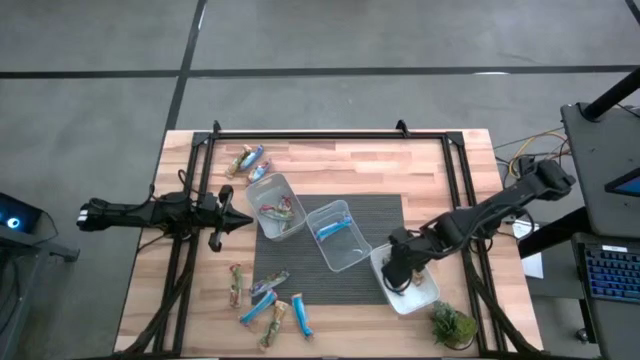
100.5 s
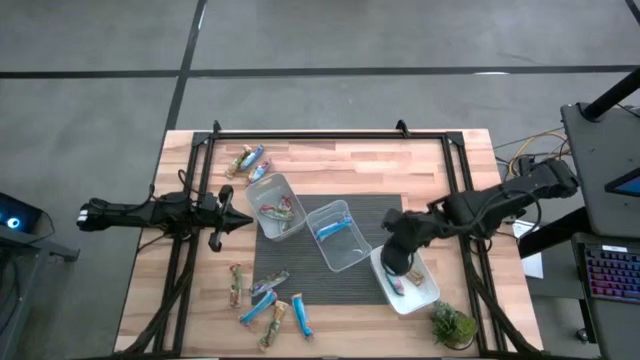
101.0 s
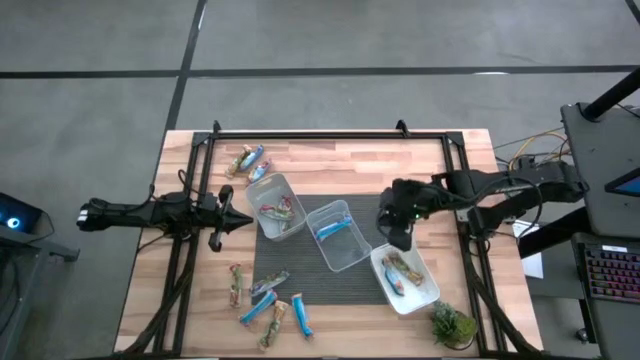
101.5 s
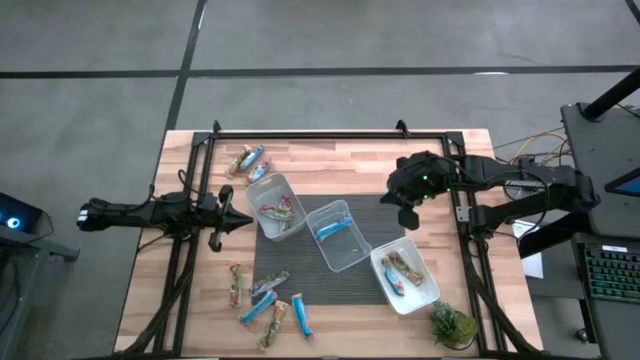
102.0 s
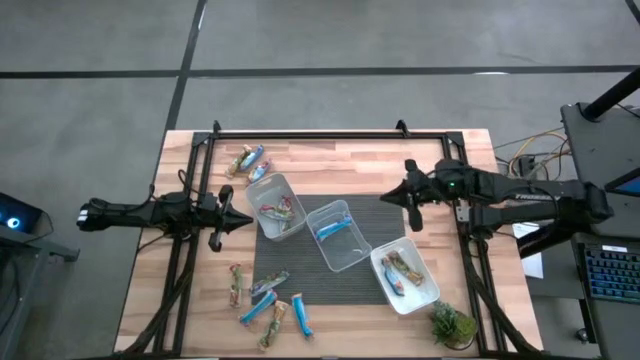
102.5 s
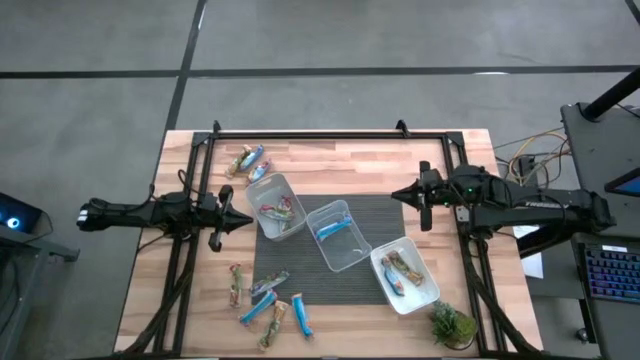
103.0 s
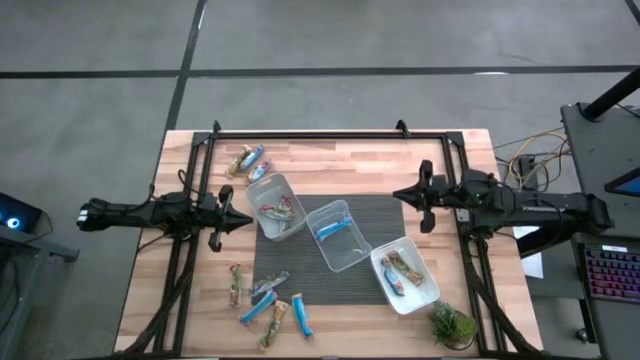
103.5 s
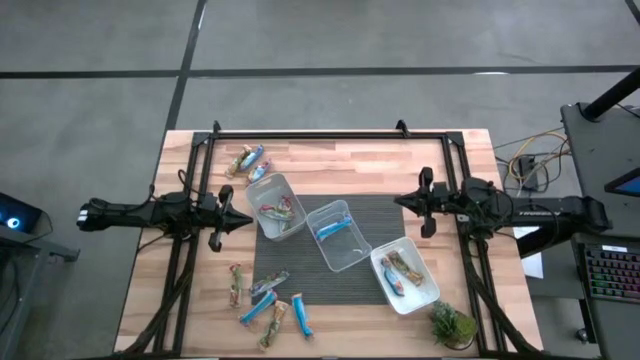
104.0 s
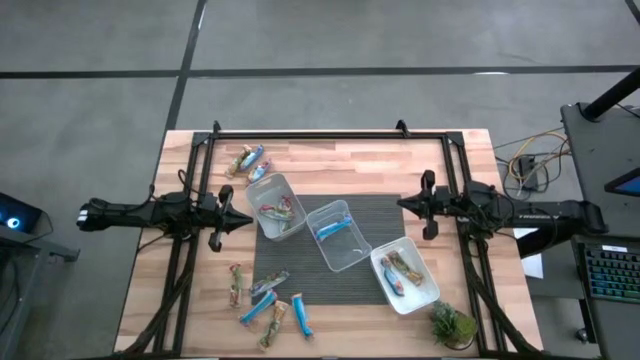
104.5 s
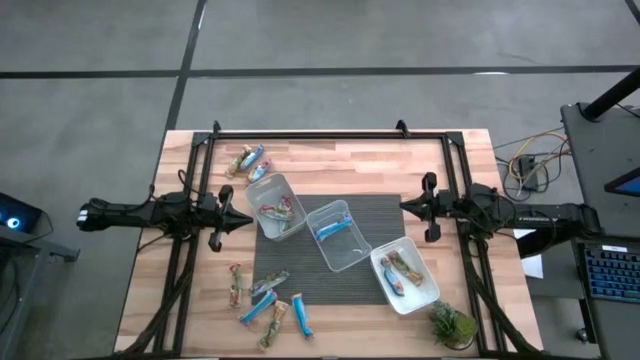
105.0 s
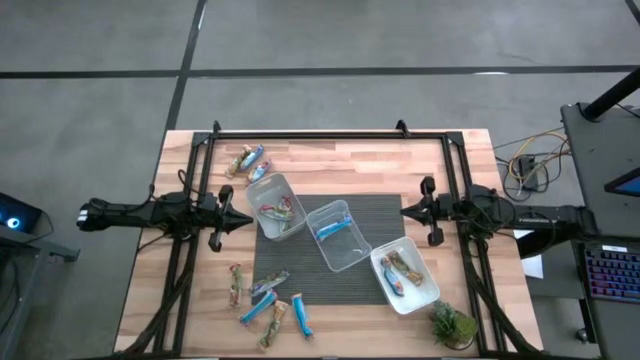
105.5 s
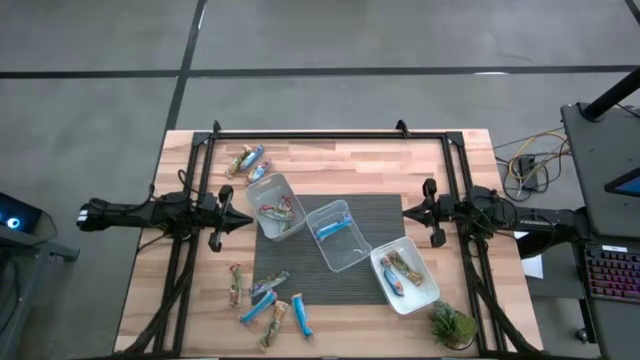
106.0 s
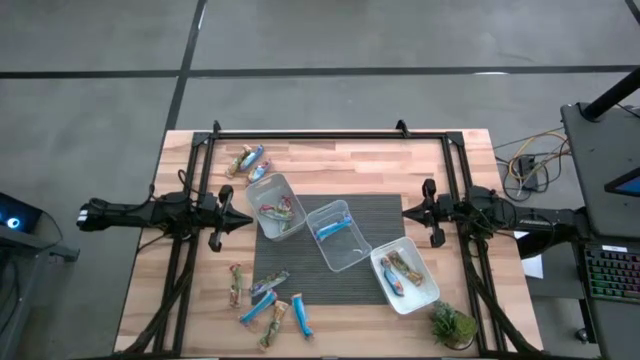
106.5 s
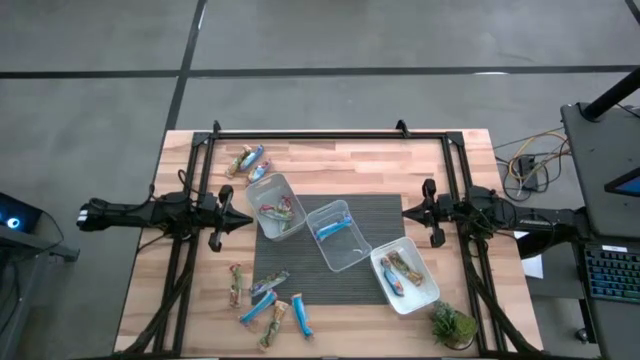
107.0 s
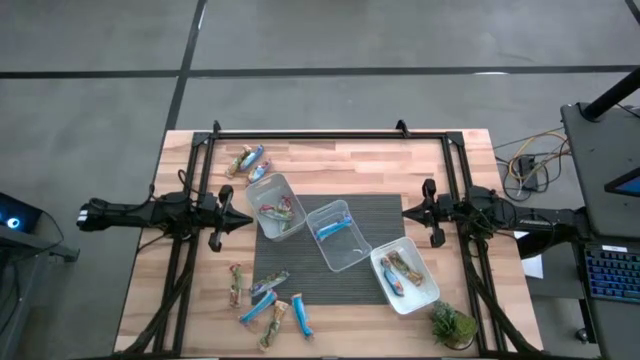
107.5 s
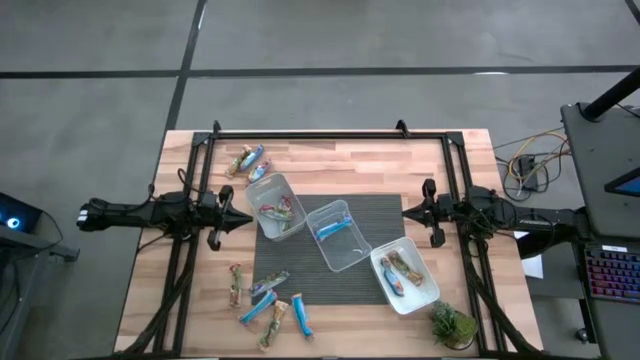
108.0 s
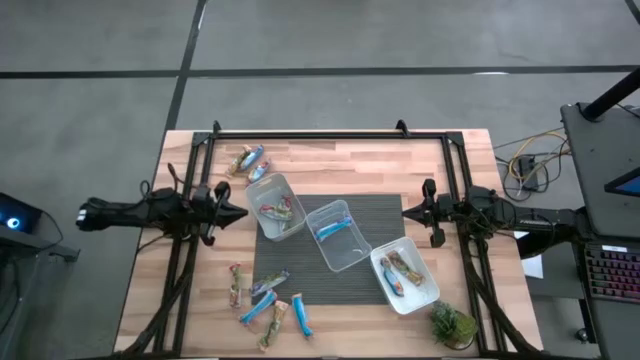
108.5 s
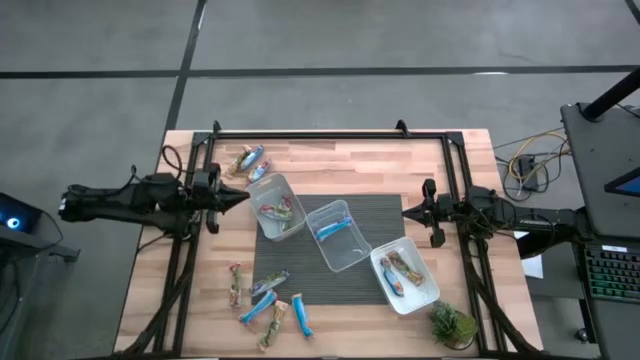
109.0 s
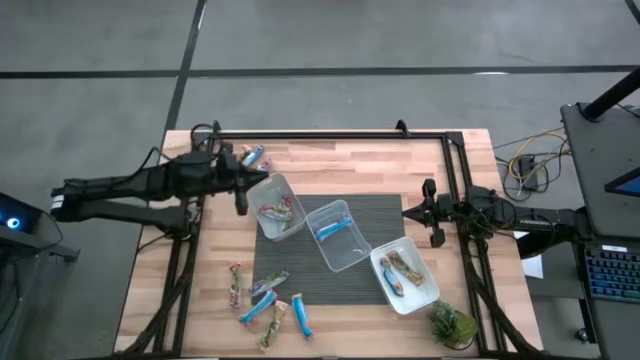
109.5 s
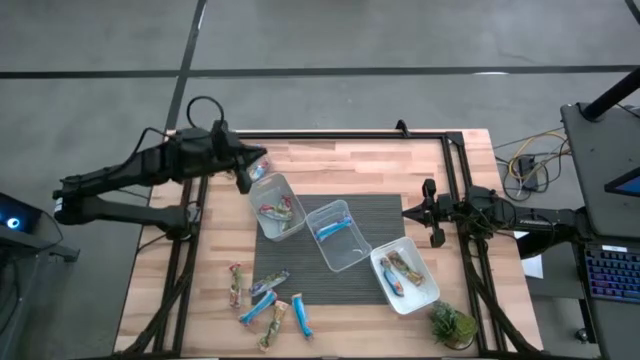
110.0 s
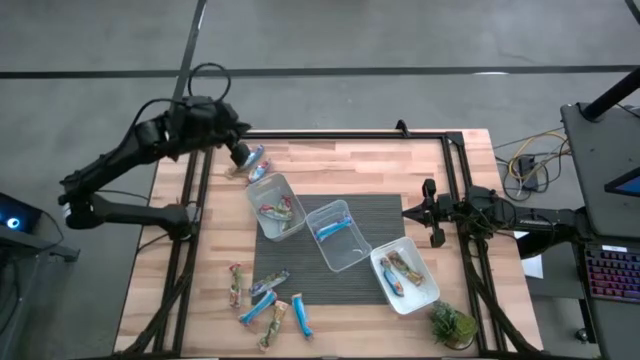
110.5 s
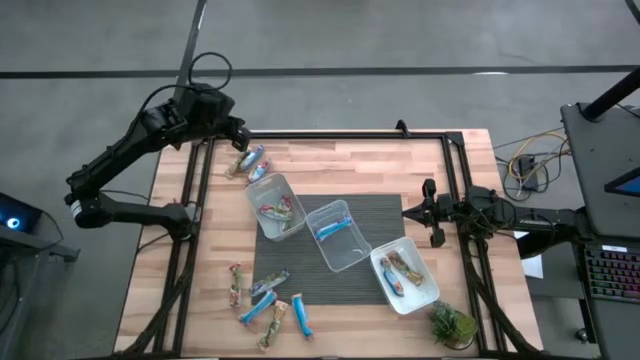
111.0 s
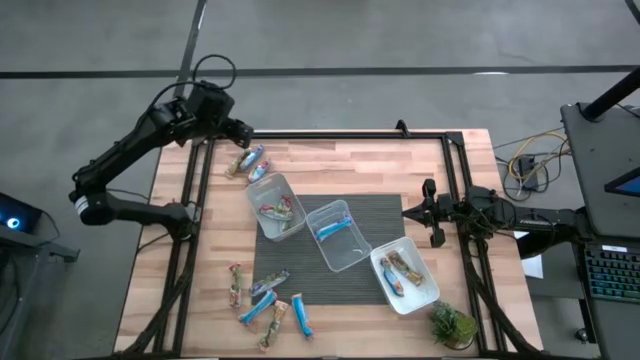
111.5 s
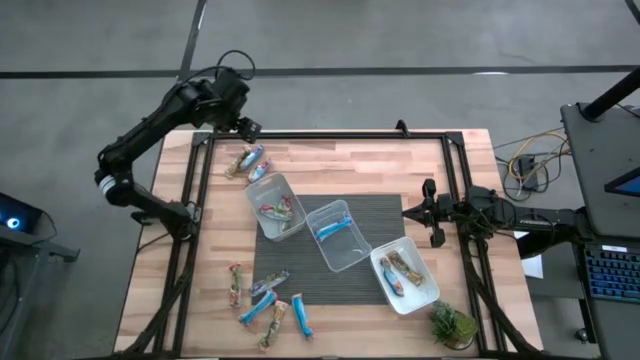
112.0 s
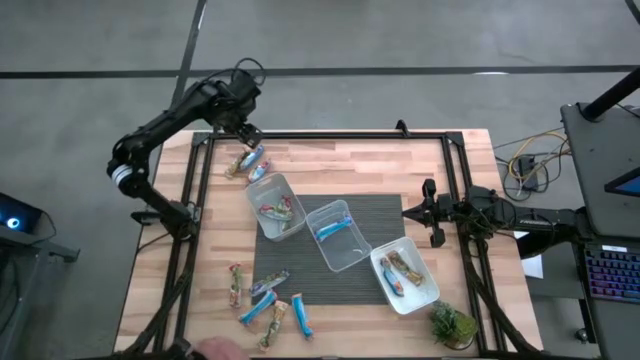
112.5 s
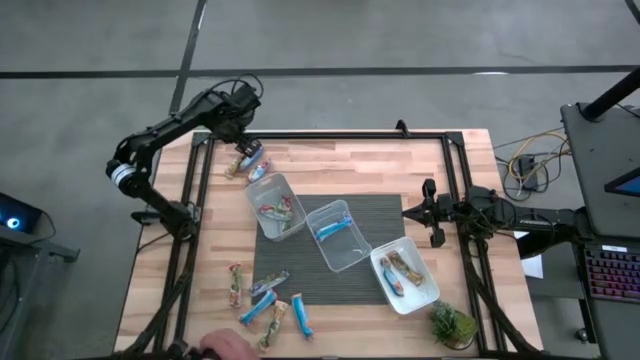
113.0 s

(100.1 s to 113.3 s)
Task: Pick and place Granola Bars by type
Put the yellow granola bar into the white bin

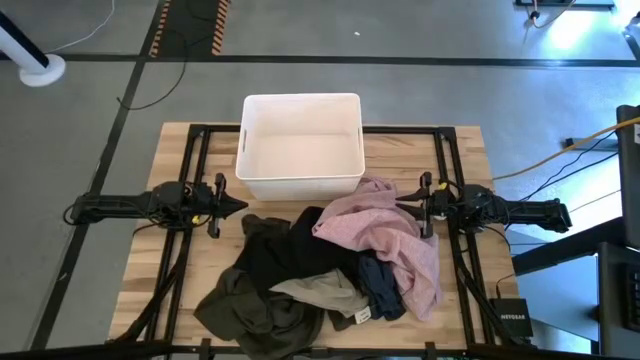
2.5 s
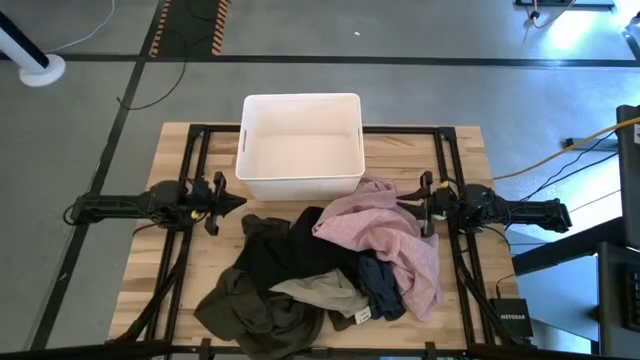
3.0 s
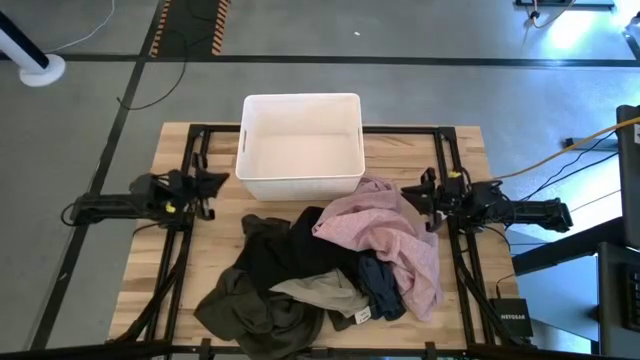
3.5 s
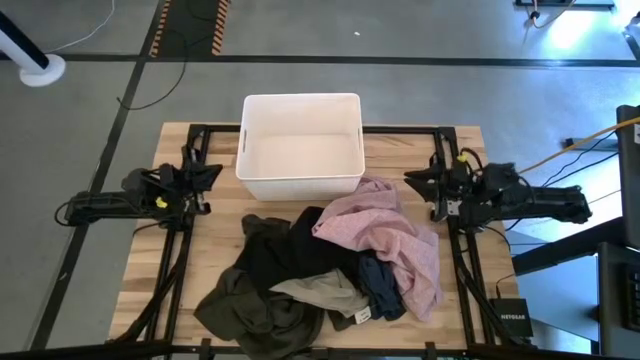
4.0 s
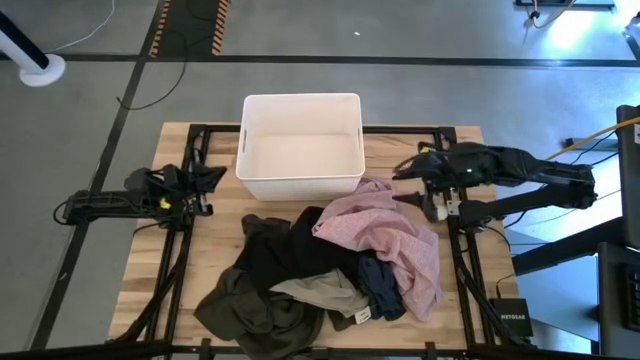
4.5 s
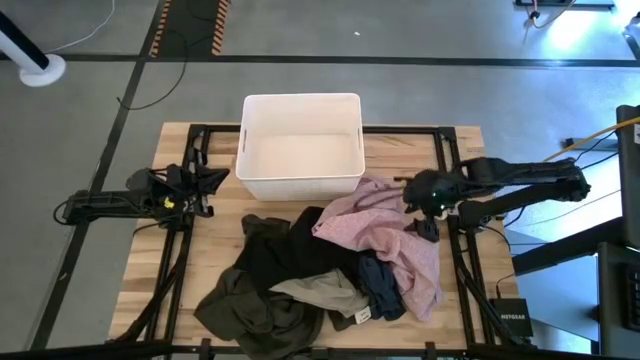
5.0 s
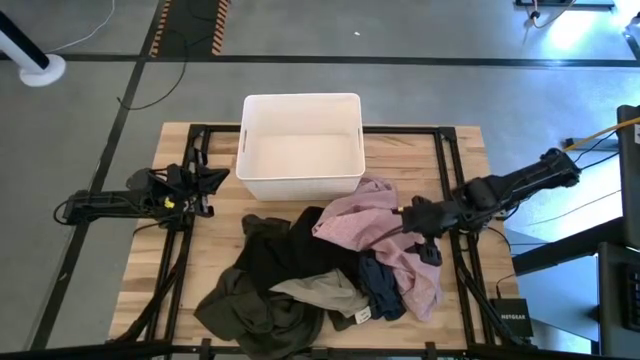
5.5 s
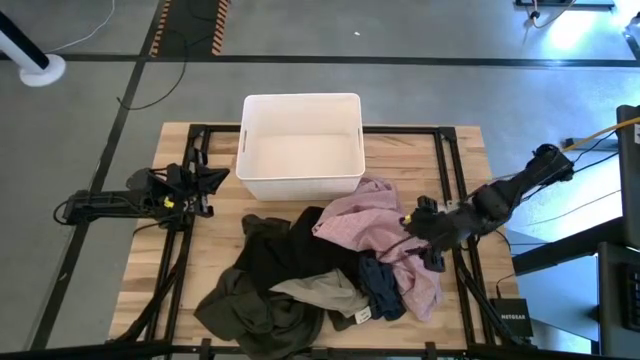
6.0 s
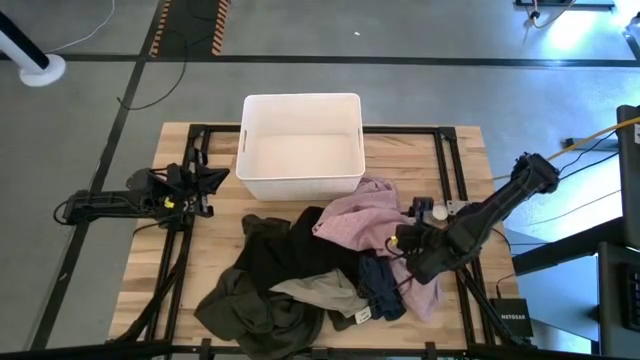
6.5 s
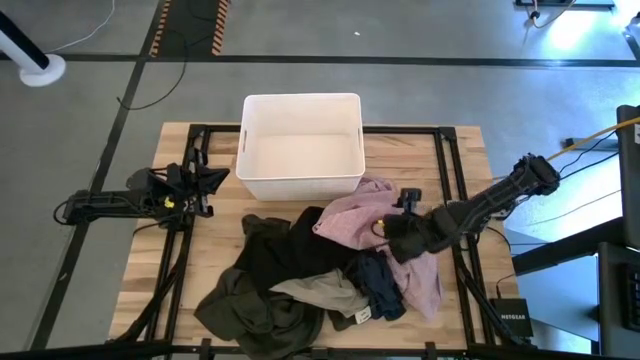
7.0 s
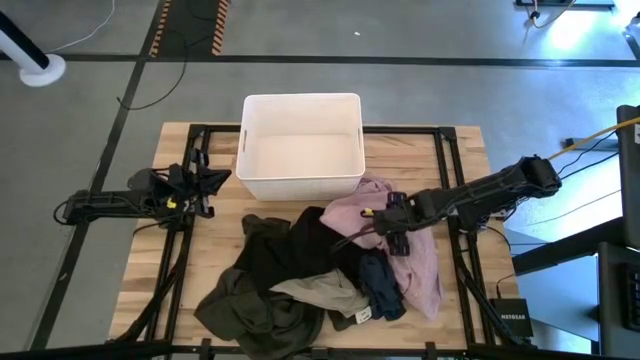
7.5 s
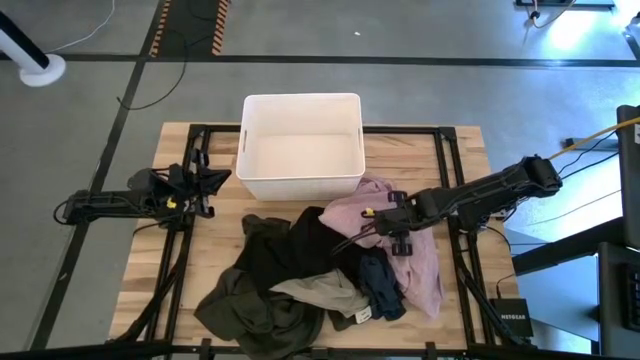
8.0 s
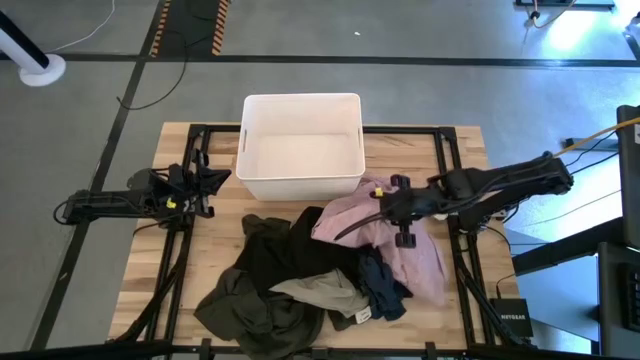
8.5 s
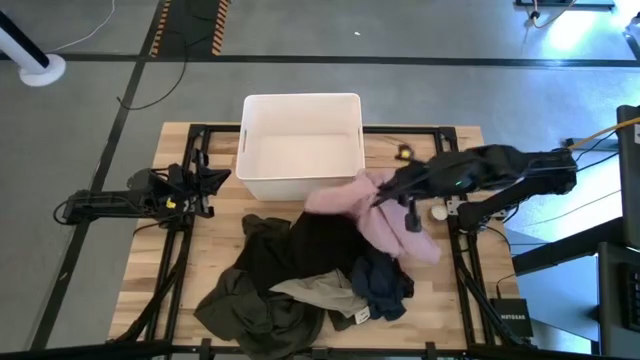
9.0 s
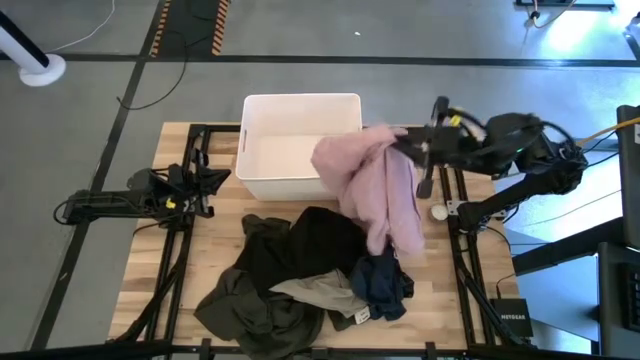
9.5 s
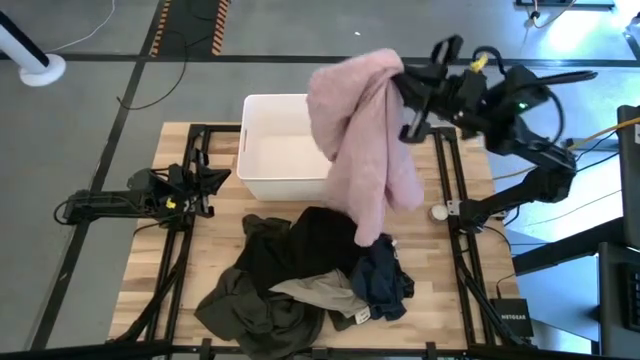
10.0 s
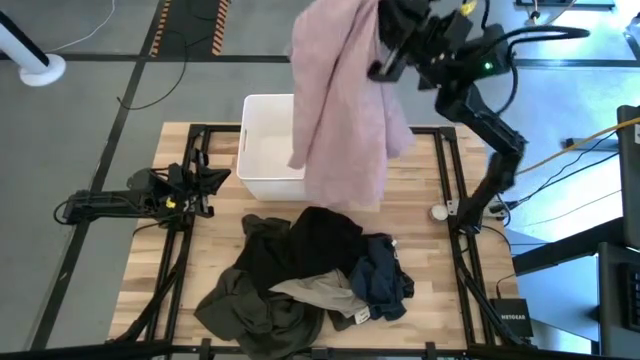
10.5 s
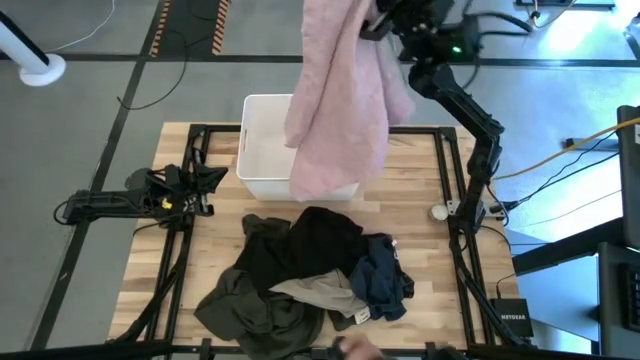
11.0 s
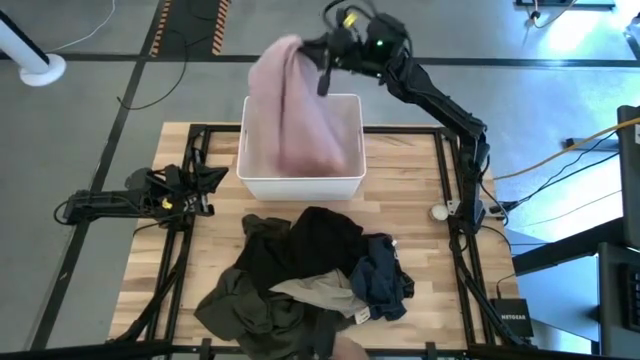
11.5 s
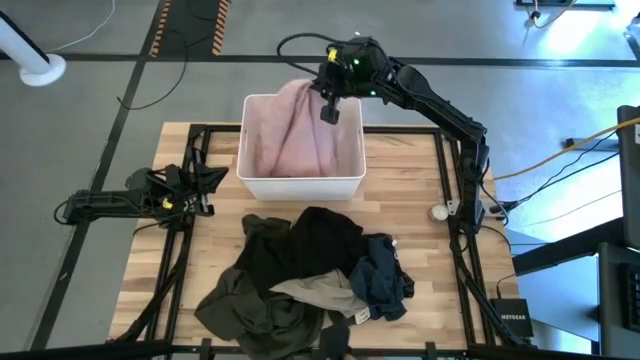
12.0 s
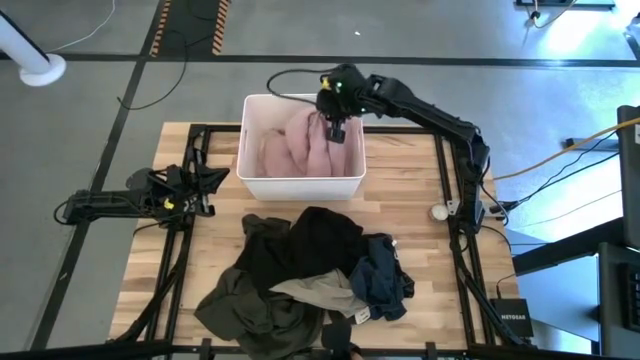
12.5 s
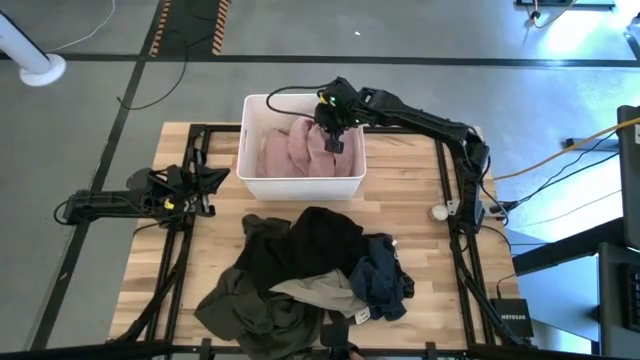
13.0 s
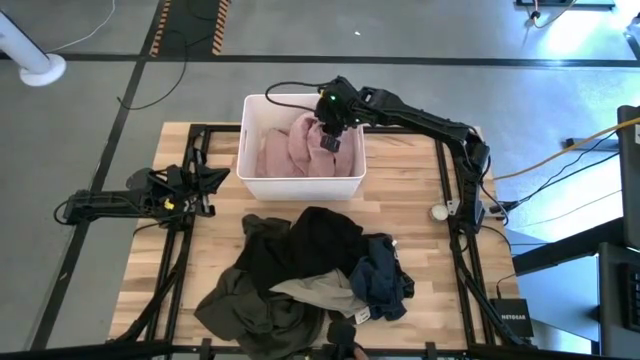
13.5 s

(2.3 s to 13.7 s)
Task: Sort clothes
Put the pink polo shirt into the white laundry organizer
